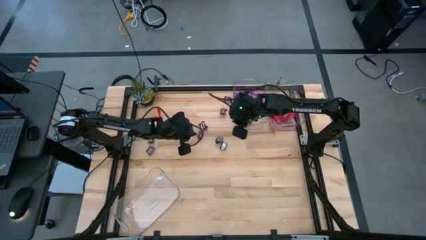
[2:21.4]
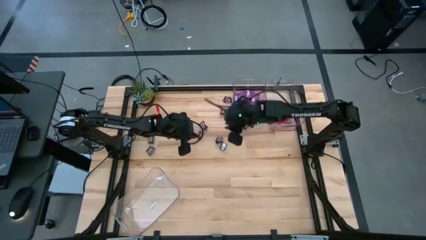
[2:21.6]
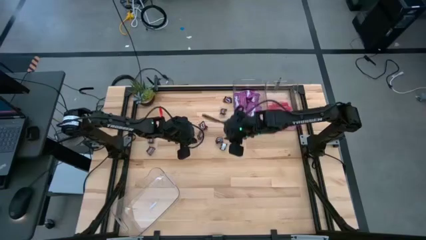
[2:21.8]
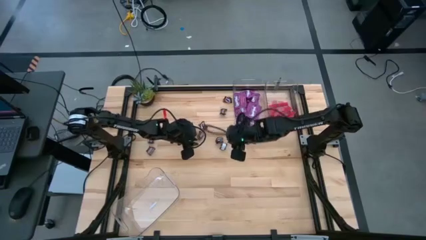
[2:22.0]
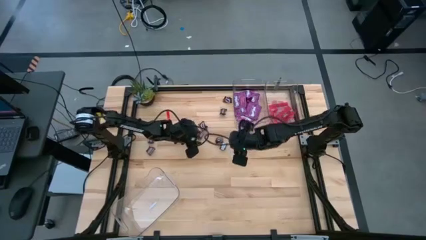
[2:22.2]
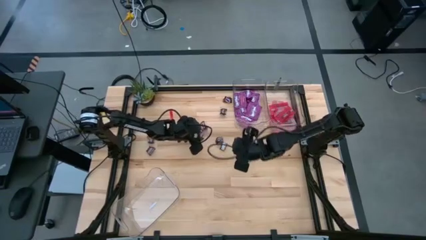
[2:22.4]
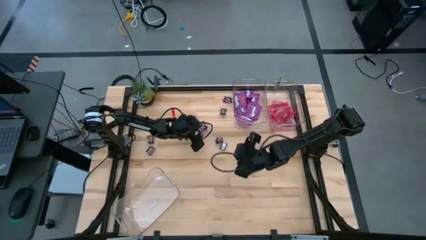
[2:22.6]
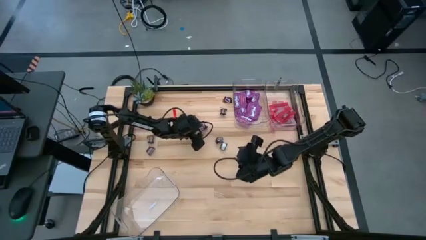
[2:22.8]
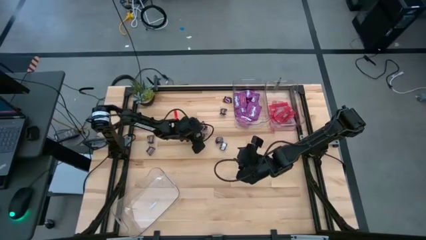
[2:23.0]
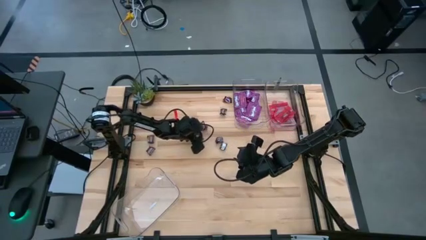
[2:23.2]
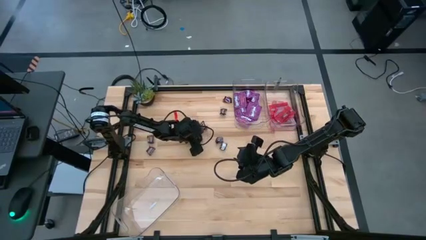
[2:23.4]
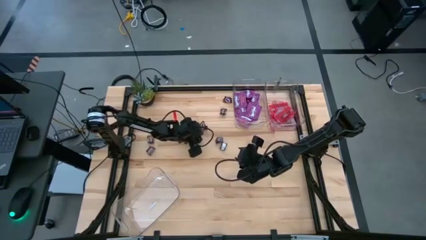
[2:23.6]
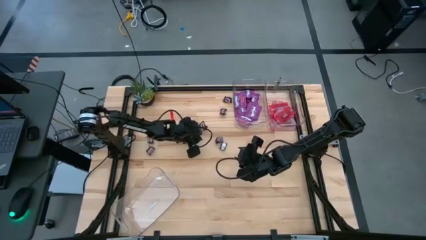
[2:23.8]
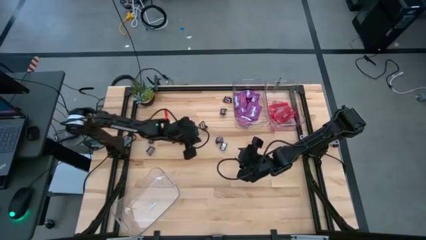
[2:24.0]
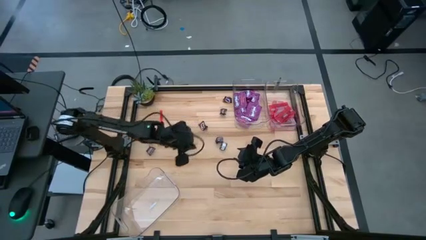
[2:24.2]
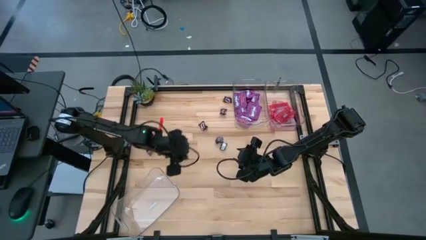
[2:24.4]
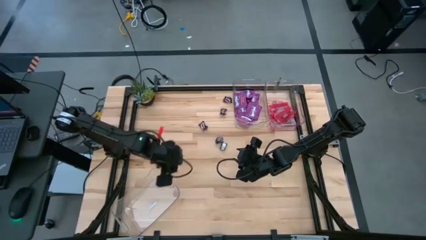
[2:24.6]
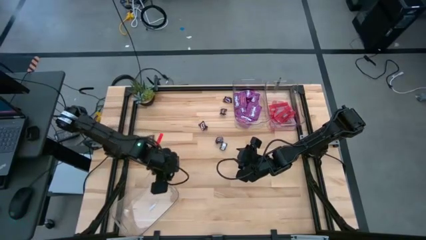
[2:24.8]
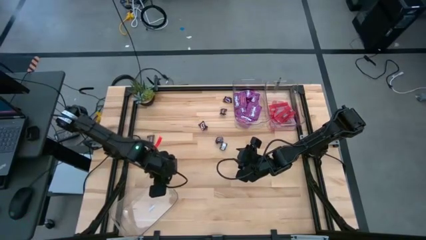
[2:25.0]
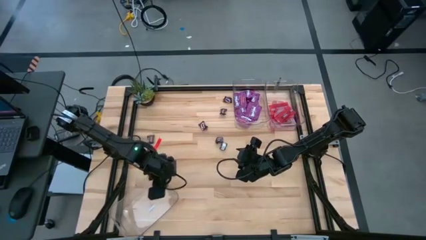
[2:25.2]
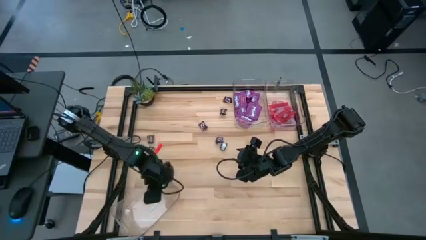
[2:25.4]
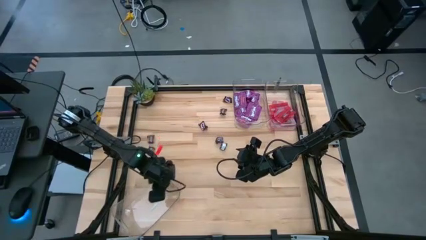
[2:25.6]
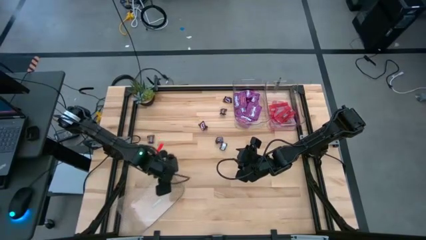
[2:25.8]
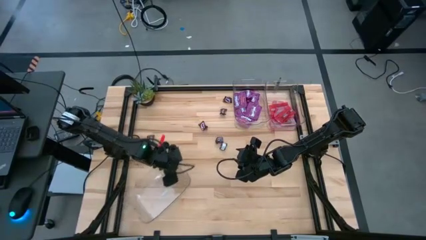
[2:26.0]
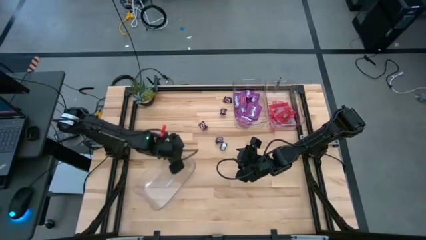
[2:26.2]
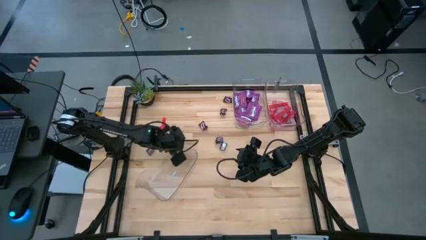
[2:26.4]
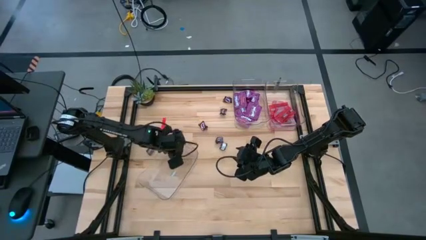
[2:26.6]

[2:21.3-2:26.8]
Task: Sort candy
Put the brown candy into the bottom transparent bin

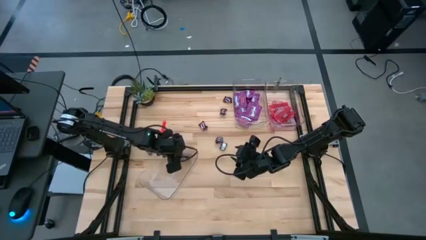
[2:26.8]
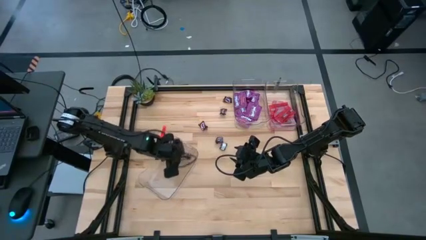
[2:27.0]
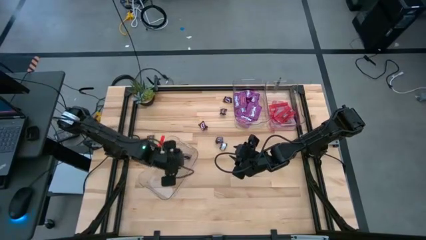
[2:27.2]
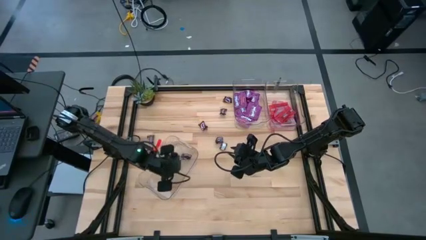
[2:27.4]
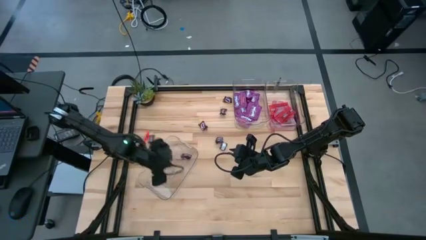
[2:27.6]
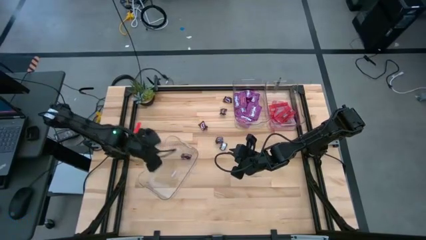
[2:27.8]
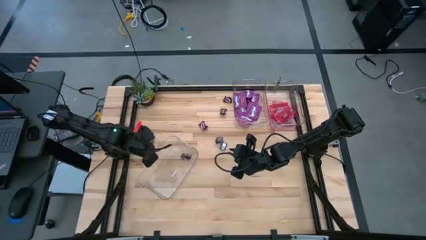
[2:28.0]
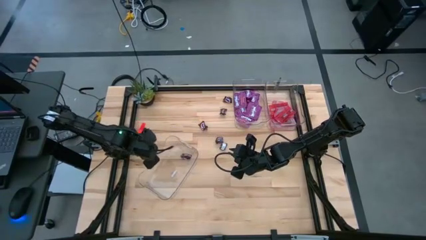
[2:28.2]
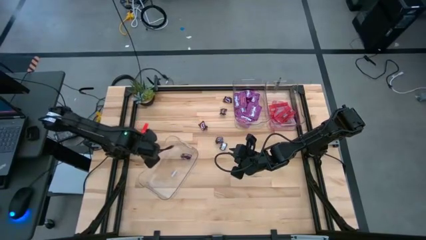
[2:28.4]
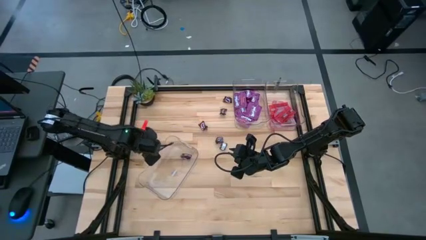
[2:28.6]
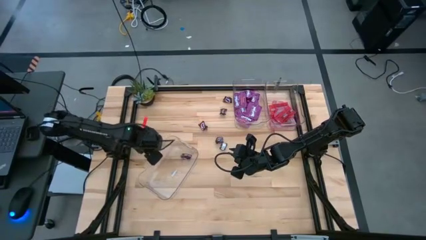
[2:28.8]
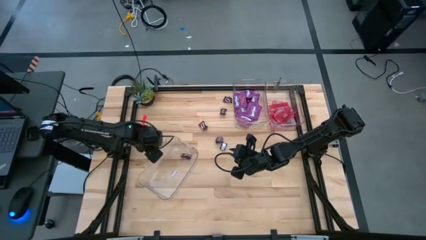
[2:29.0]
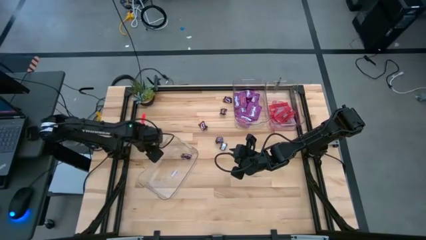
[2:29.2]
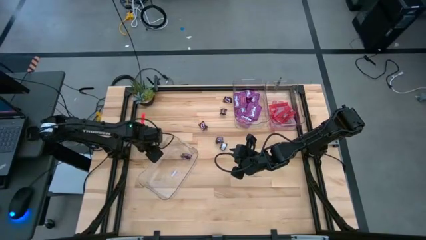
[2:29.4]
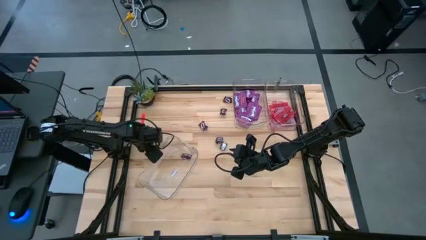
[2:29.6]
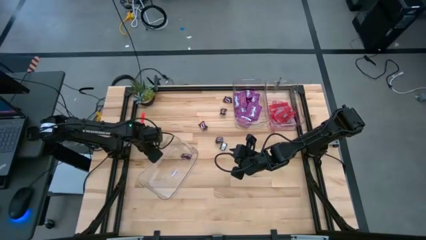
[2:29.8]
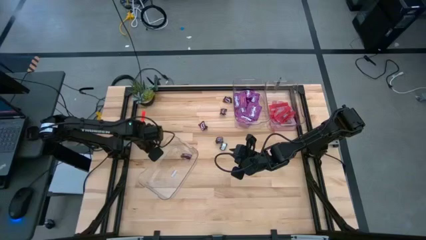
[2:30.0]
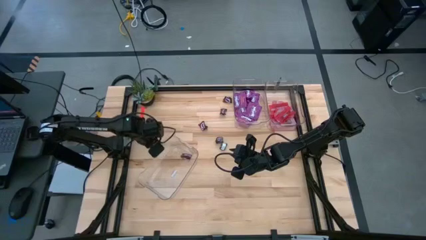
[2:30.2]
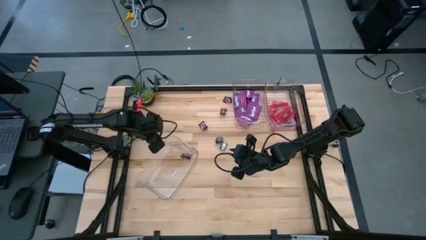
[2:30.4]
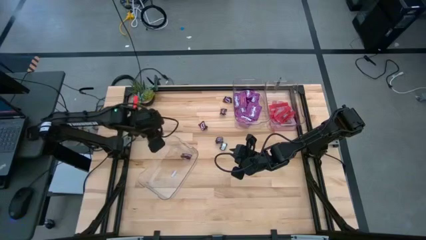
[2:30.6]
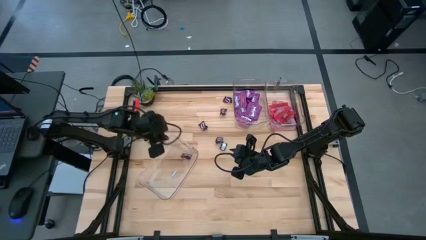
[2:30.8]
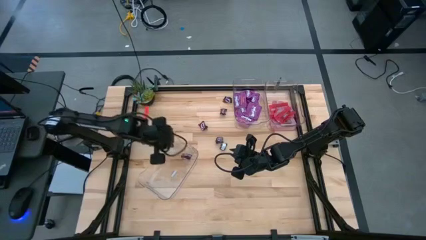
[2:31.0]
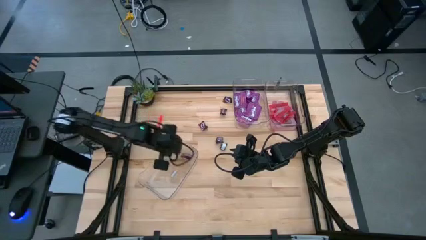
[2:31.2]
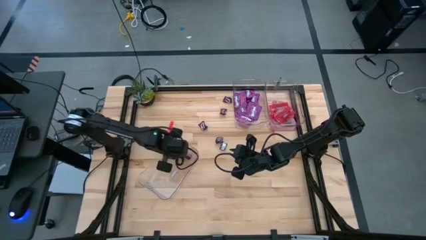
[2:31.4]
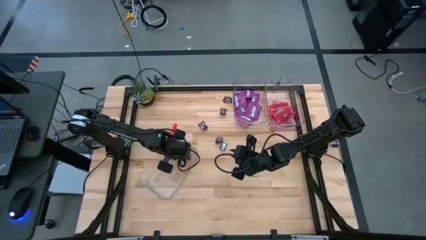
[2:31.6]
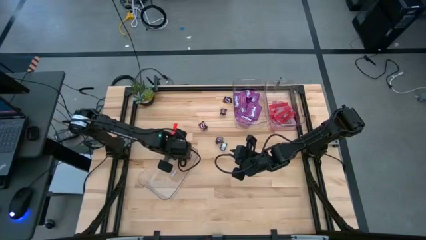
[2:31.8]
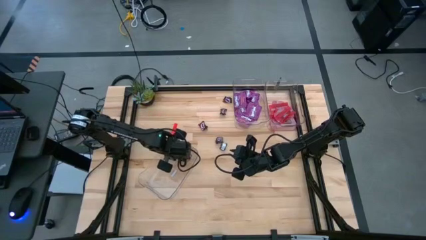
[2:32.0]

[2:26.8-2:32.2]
Put the brown candy into the bottom transparent bin

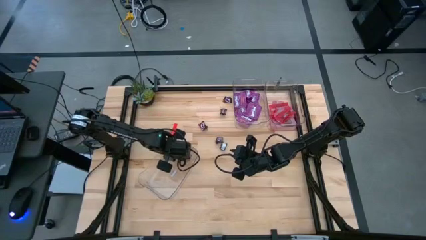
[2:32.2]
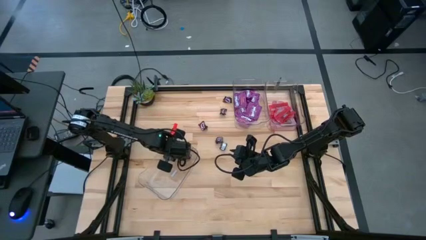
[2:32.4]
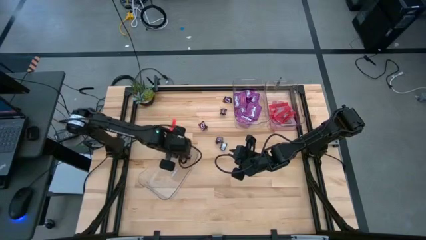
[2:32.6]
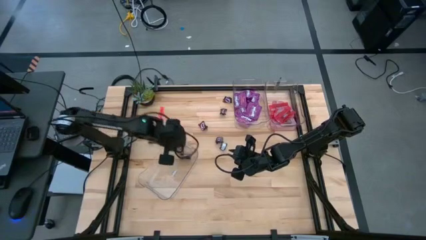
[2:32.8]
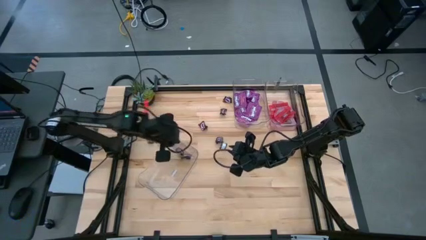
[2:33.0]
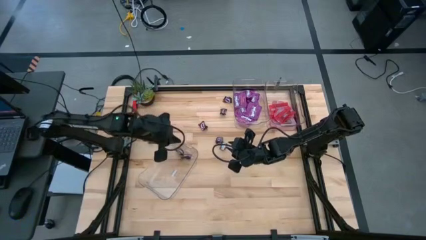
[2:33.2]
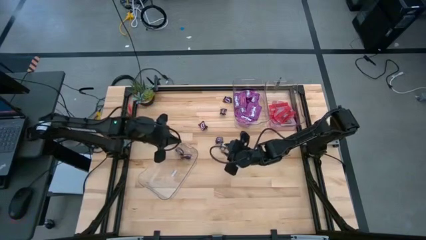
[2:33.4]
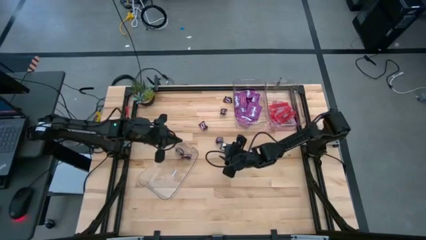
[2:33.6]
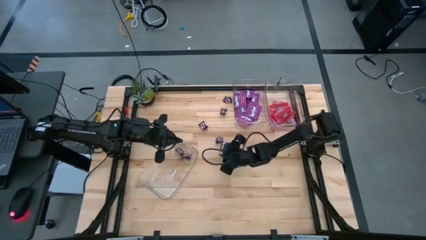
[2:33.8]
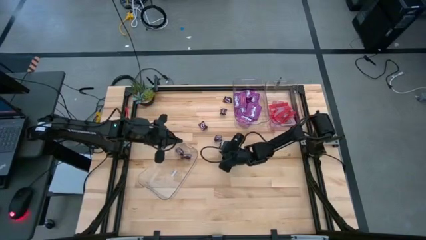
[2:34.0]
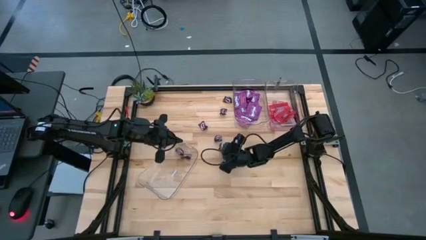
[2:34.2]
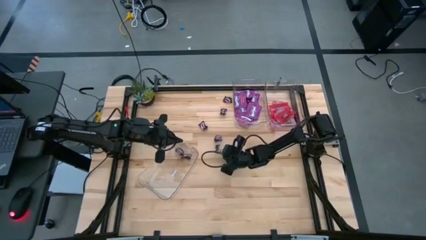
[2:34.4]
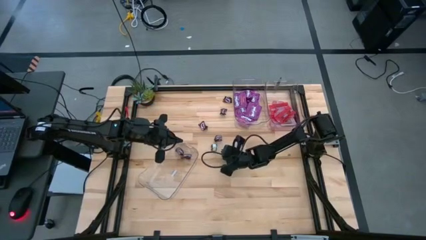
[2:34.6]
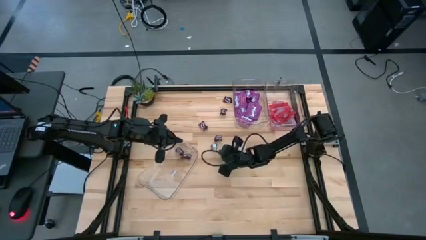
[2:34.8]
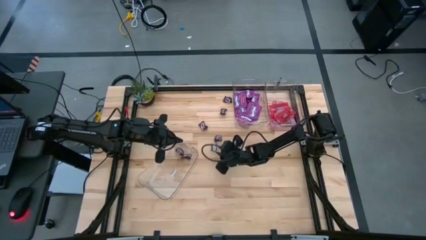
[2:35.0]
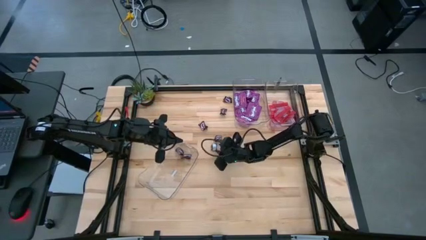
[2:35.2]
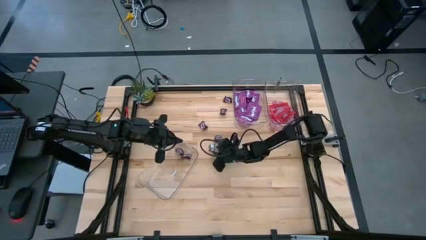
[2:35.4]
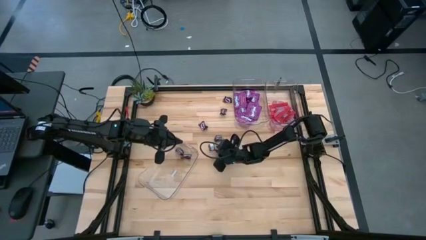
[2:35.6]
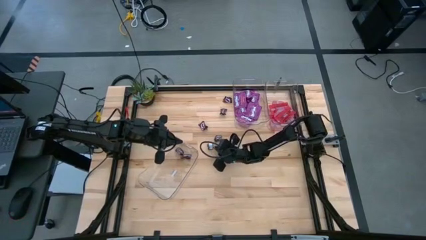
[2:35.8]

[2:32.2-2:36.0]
Put the brown candy into the bottom transparent bin

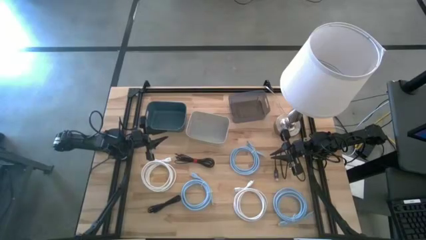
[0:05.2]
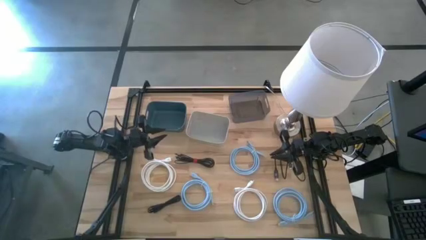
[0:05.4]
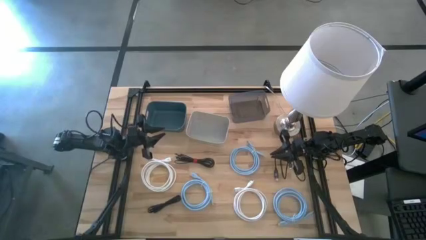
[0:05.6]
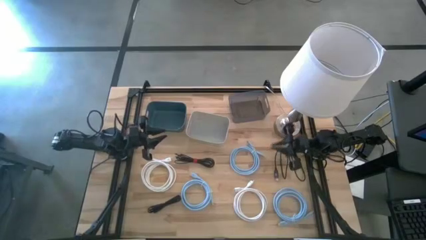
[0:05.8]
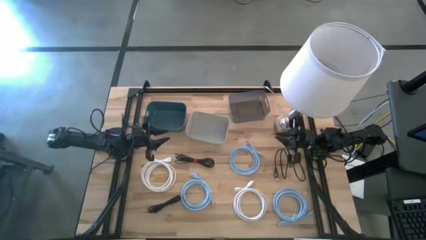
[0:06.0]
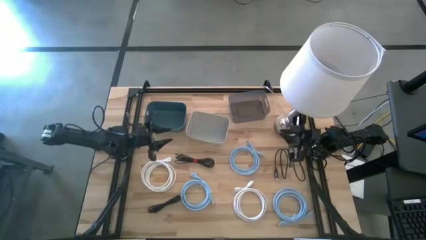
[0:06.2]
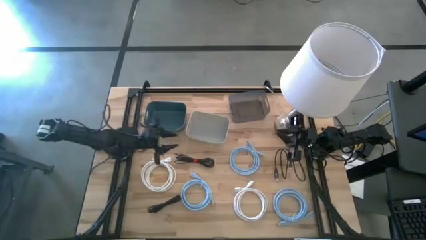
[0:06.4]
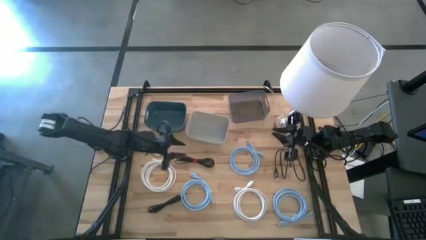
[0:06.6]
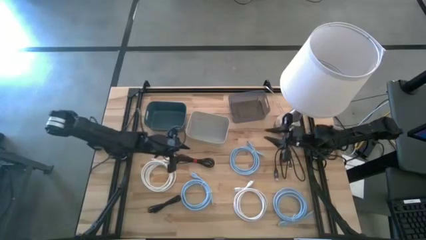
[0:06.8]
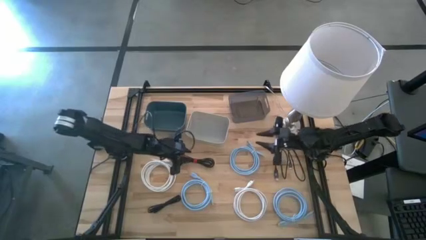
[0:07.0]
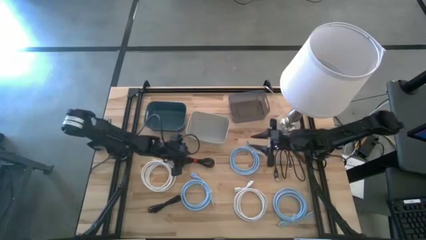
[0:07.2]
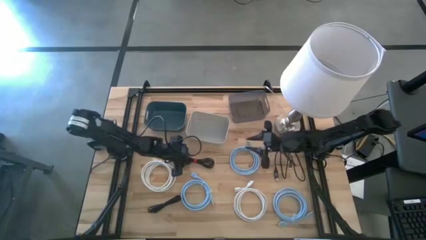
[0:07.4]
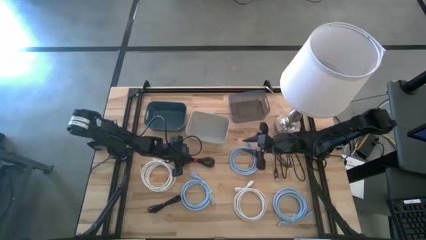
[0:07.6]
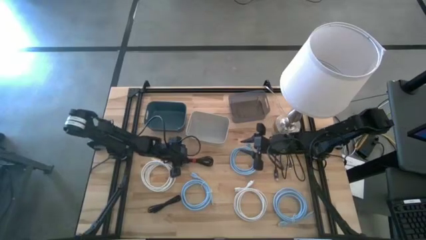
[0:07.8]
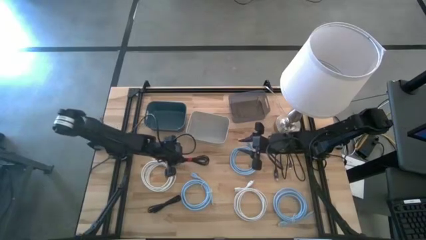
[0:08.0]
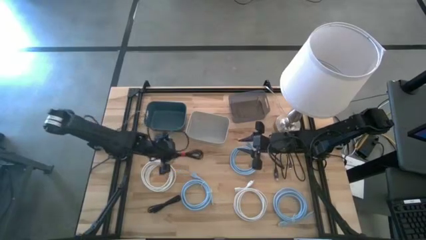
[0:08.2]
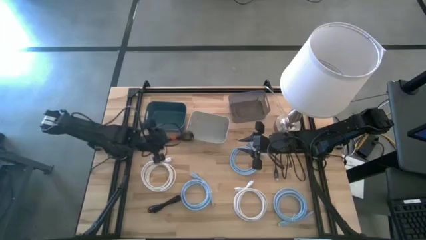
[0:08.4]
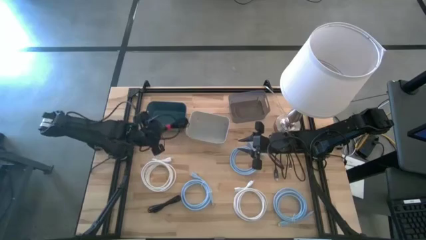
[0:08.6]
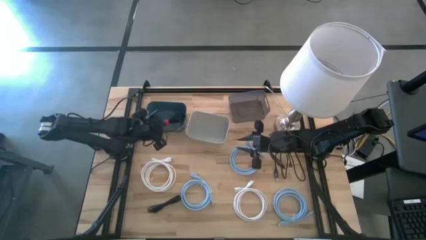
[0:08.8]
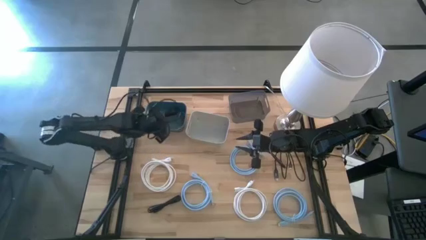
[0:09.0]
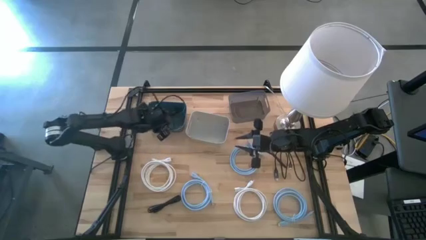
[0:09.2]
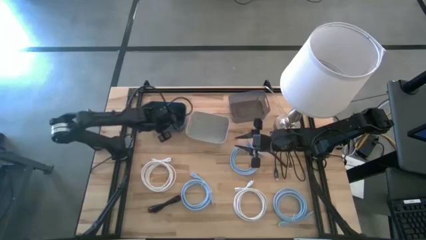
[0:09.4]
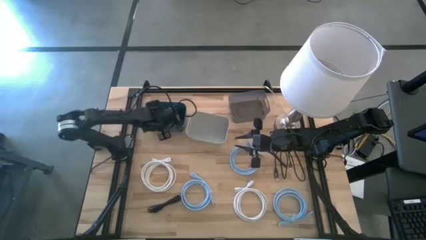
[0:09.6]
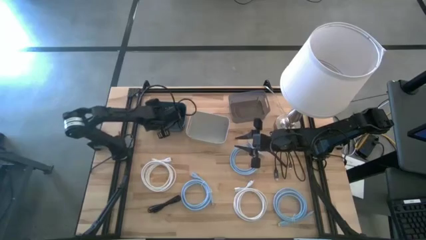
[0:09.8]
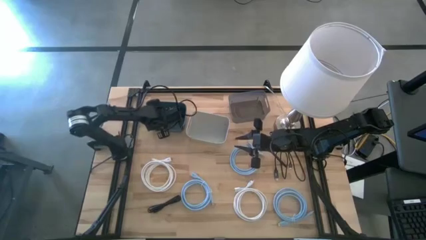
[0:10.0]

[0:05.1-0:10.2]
Task: Pick & Place USB Port
Put the top left black charger cable into the gray bin
